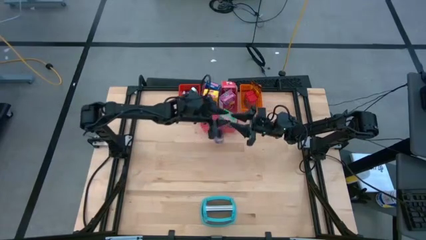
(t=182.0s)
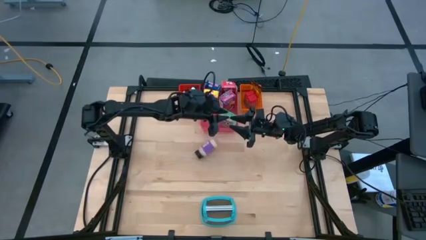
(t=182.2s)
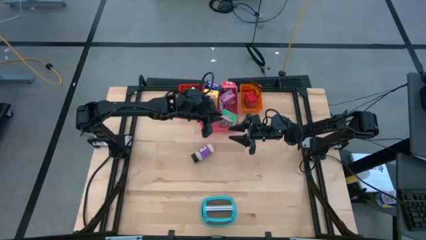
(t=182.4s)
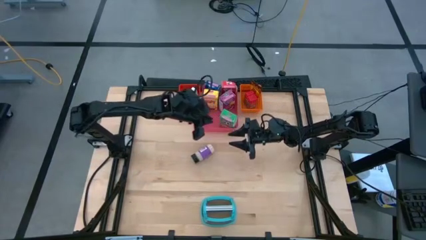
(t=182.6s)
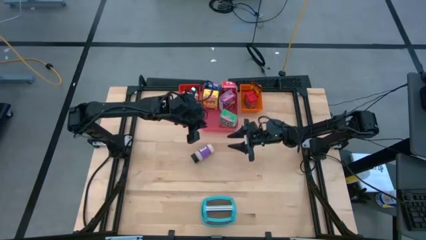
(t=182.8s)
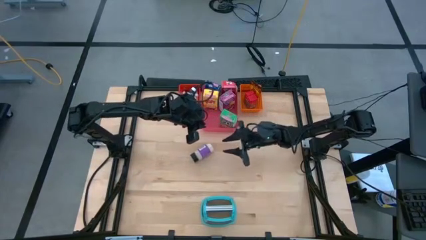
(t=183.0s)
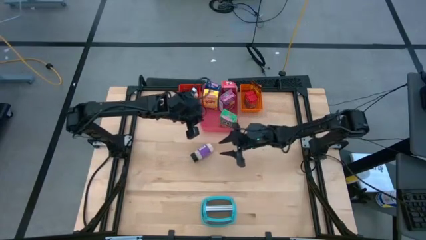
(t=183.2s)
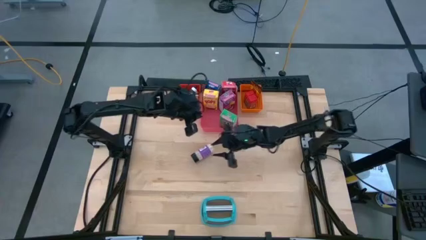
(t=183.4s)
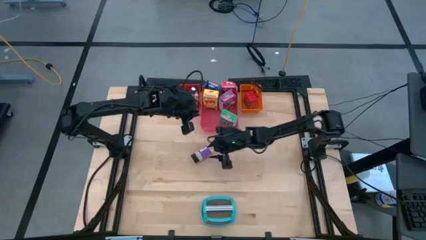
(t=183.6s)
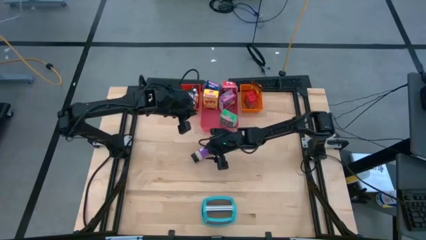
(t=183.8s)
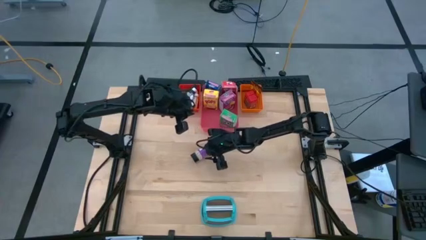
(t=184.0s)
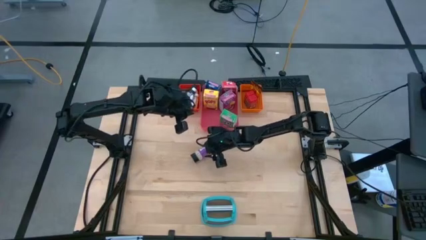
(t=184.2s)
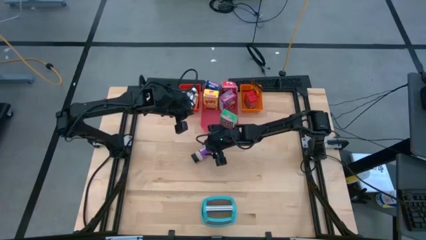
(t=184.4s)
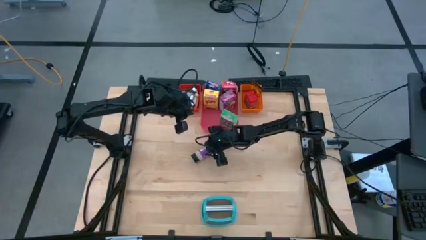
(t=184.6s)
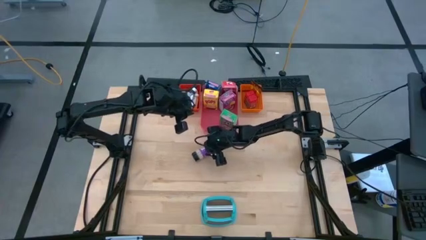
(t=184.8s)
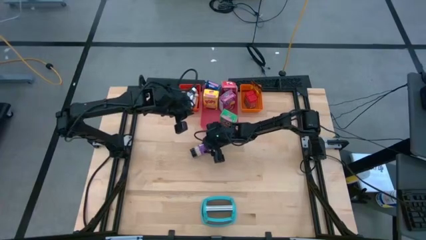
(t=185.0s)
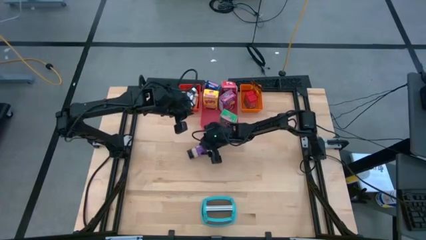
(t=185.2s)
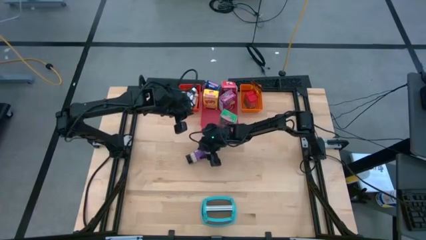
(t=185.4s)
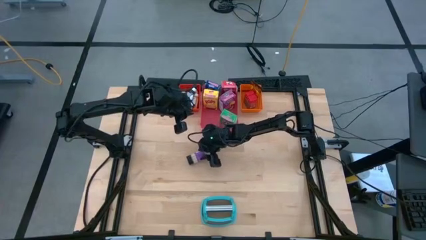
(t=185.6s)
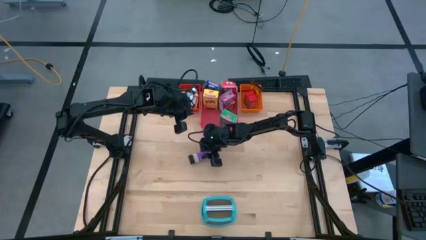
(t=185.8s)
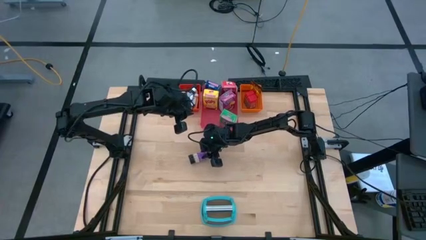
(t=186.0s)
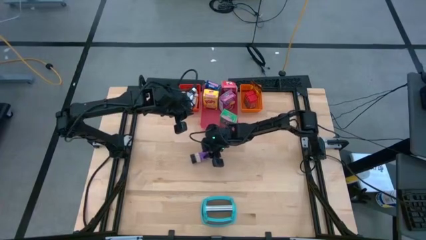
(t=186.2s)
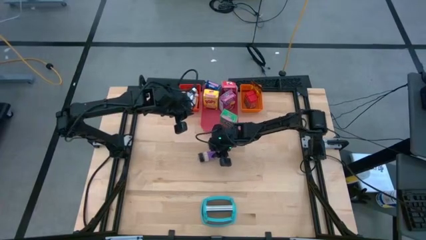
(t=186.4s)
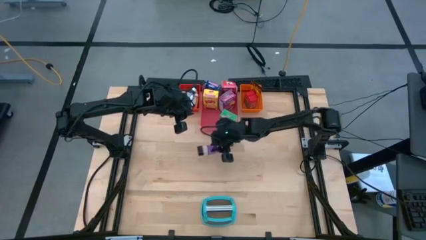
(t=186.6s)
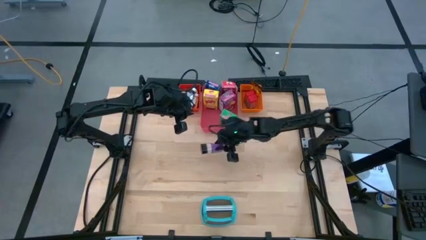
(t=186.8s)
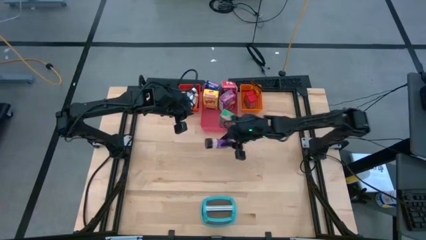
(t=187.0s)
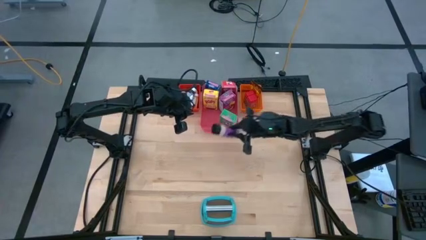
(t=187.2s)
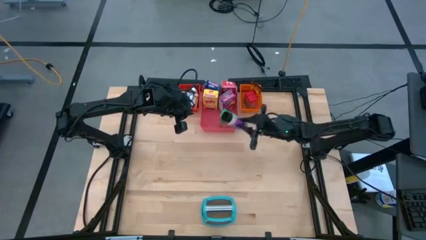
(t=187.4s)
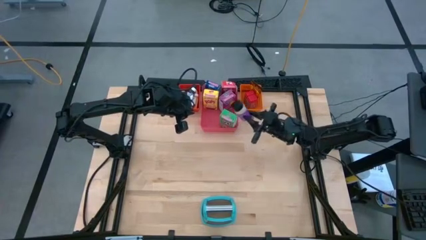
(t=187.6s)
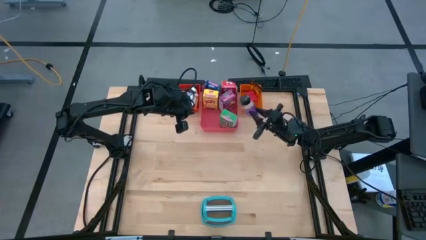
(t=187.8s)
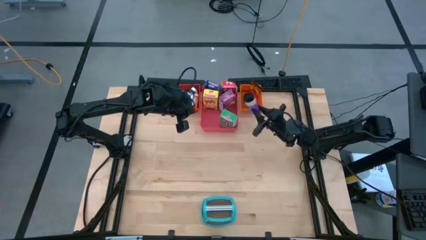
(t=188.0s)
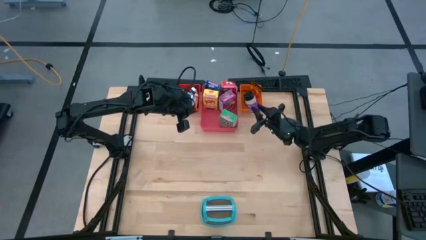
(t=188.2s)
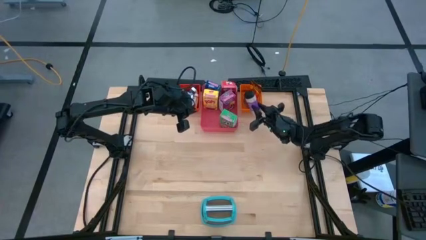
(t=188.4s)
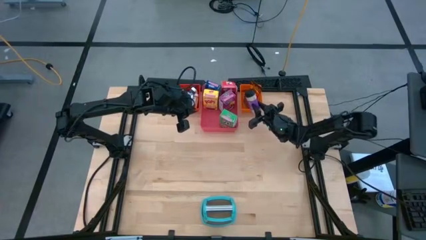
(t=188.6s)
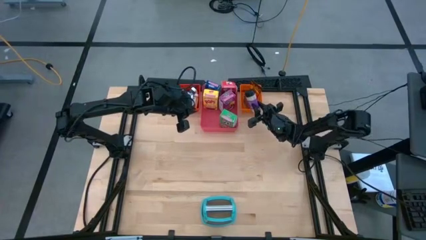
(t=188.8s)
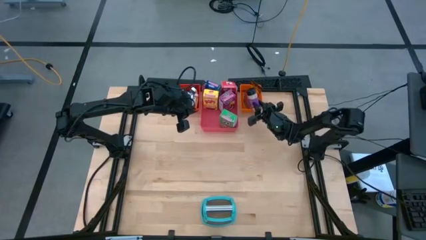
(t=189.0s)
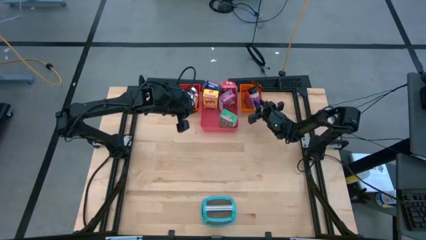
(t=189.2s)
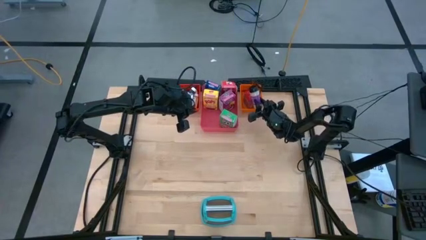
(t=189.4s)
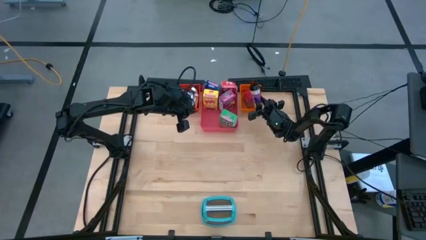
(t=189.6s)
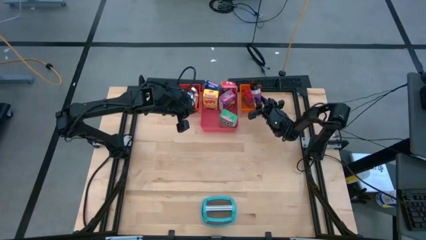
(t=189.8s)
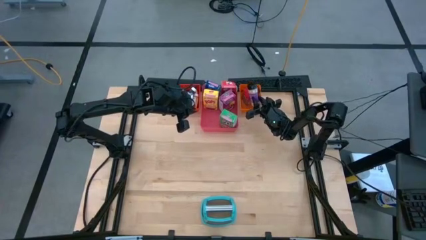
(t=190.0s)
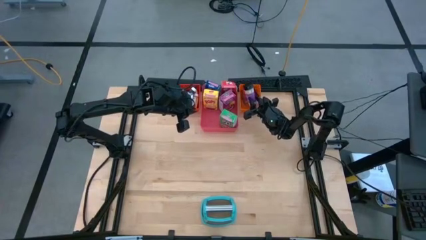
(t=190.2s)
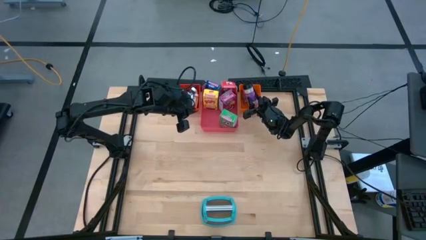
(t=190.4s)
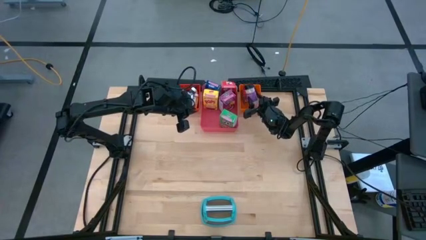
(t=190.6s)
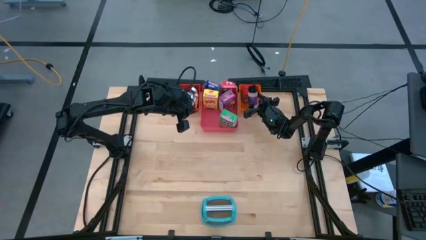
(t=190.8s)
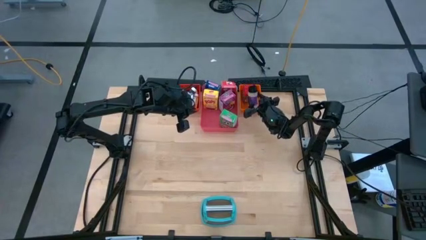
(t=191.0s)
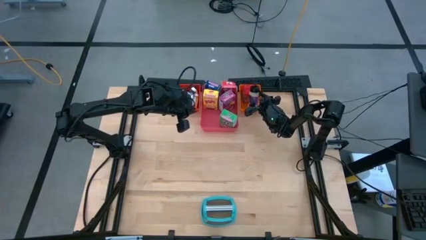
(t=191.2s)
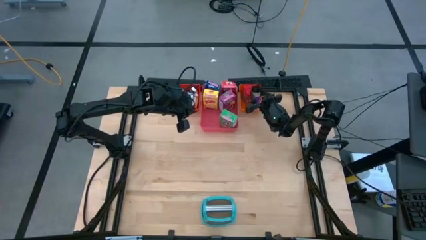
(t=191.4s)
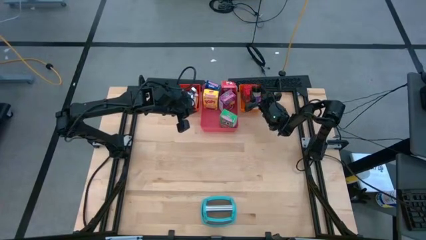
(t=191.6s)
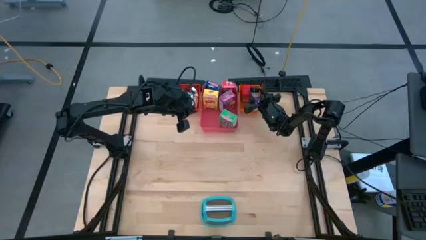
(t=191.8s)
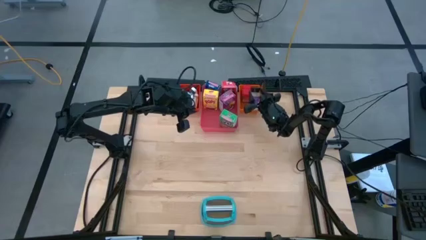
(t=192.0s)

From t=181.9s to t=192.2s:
Task: Pick & Place Kitchen Items
Put the purple seasoning bottle into the orange bin

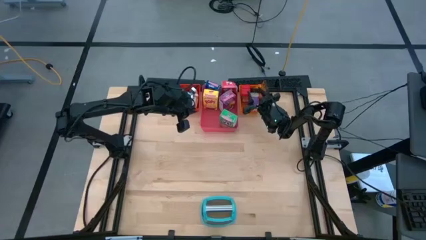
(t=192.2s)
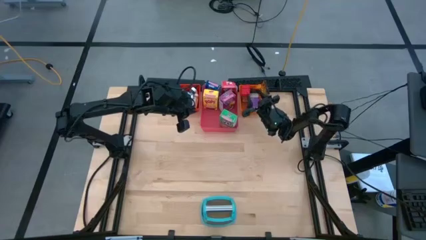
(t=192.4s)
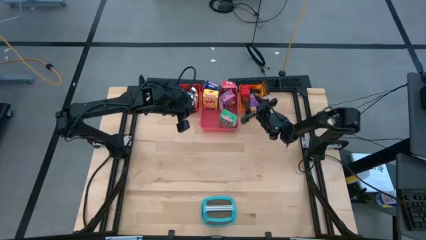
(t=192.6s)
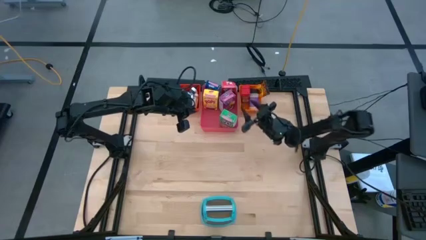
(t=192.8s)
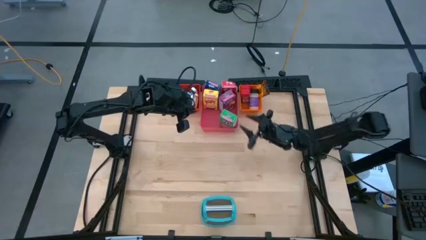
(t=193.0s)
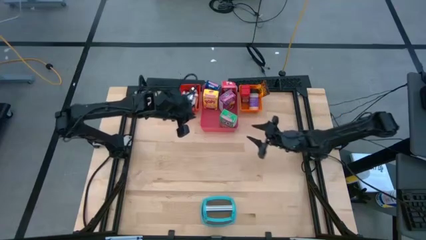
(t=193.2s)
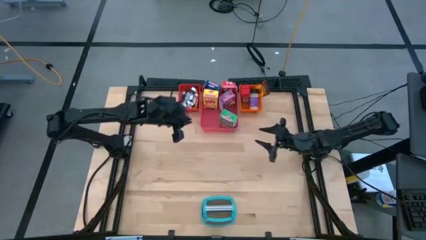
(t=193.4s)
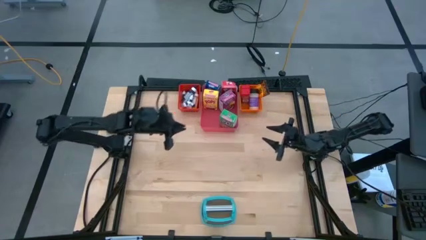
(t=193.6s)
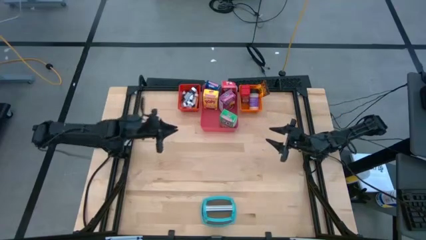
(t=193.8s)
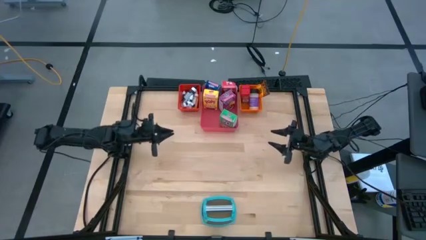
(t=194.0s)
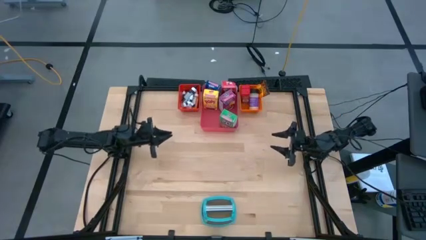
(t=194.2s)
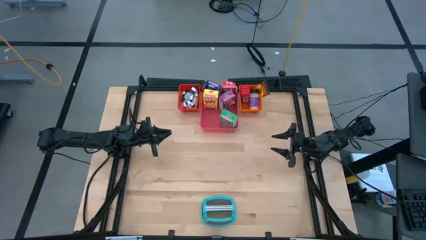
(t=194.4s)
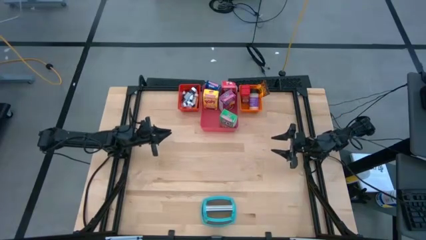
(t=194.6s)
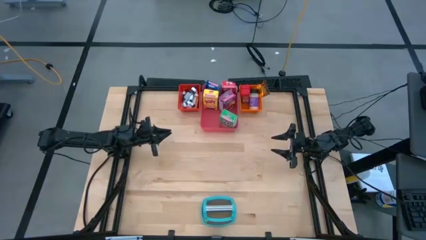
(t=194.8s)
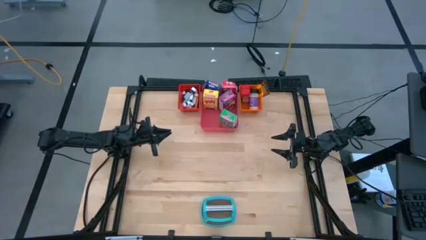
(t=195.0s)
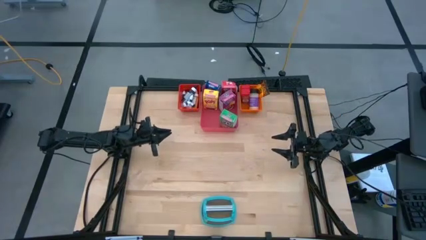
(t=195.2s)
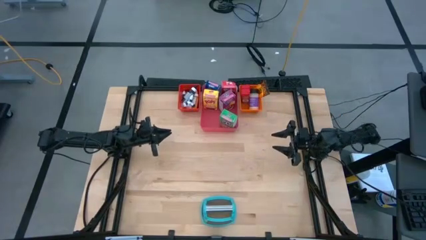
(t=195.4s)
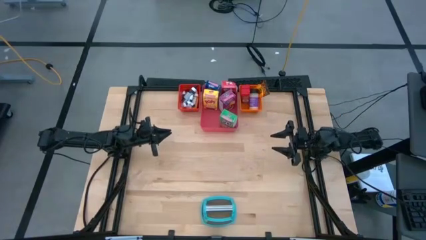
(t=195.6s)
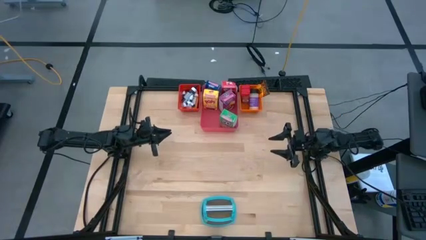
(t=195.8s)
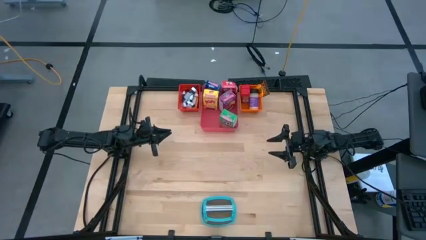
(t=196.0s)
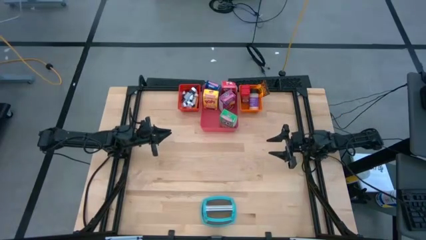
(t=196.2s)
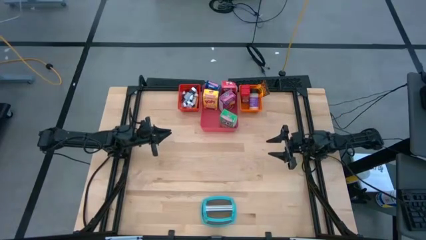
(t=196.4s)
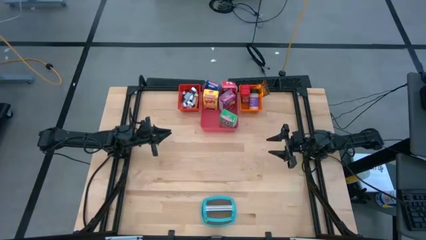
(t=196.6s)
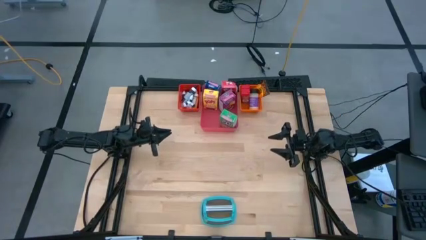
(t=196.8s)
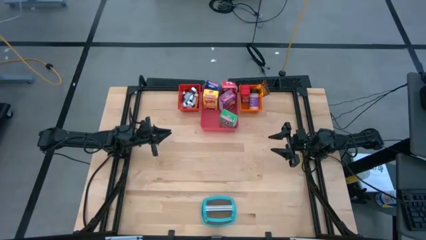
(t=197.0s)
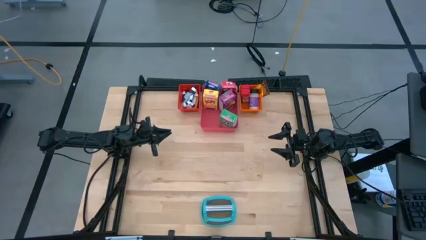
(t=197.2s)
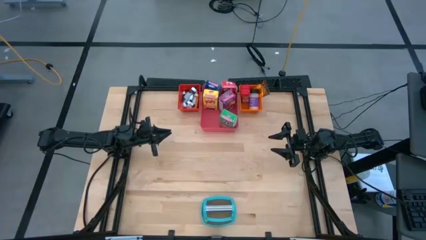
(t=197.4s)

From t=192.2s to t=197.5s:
Return to Home Position
